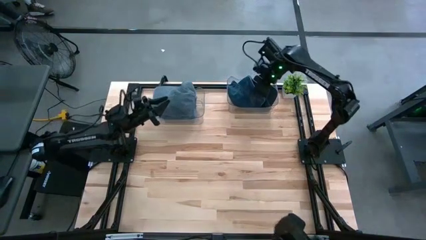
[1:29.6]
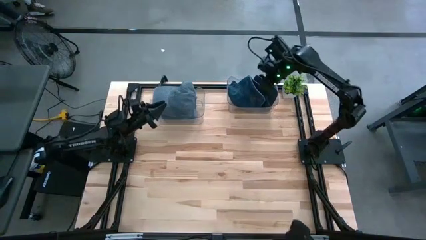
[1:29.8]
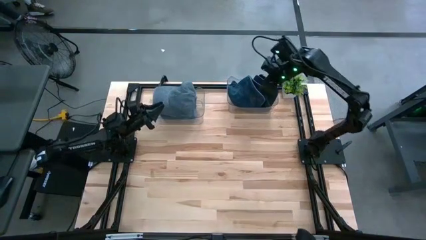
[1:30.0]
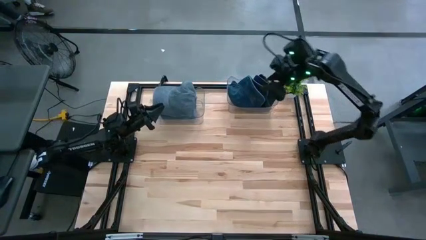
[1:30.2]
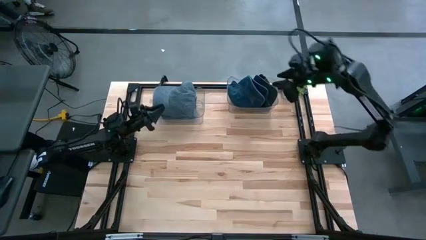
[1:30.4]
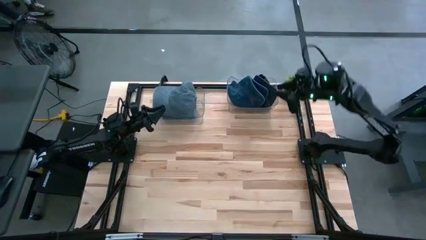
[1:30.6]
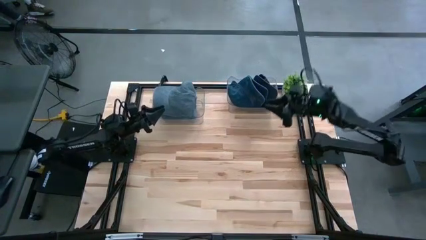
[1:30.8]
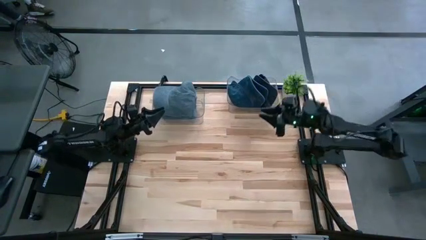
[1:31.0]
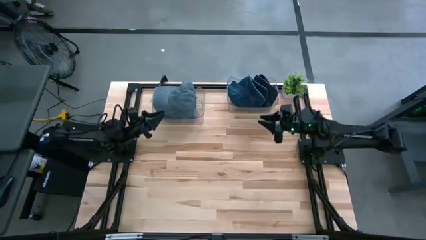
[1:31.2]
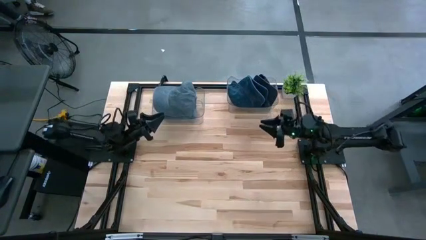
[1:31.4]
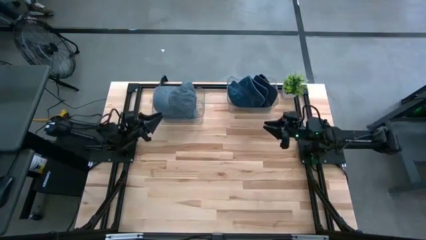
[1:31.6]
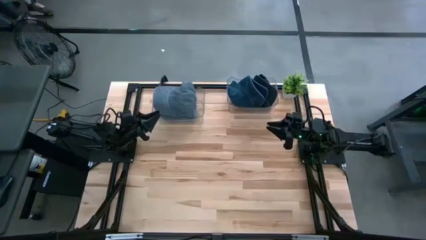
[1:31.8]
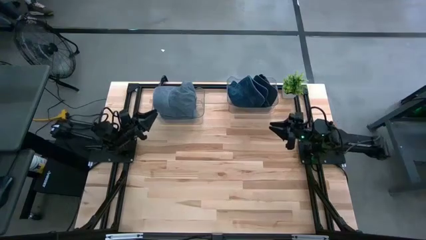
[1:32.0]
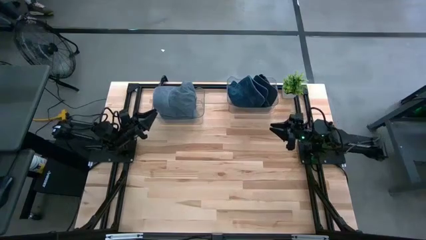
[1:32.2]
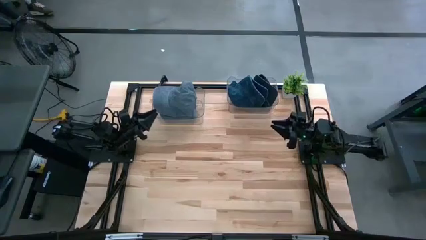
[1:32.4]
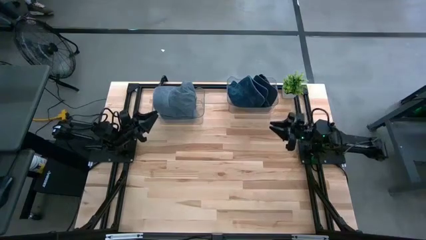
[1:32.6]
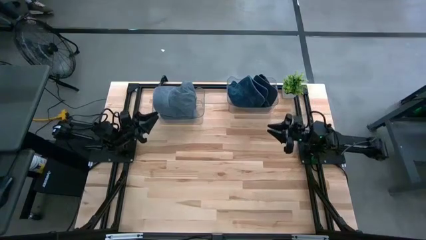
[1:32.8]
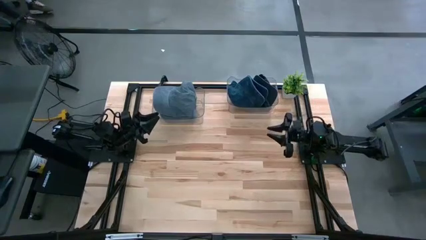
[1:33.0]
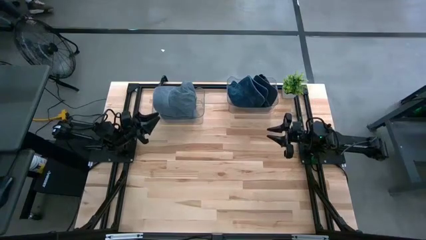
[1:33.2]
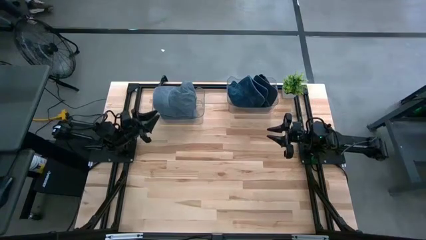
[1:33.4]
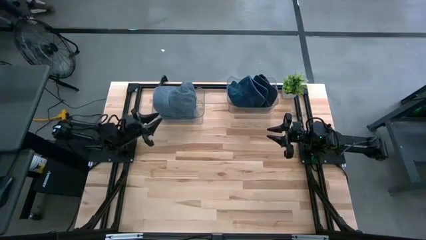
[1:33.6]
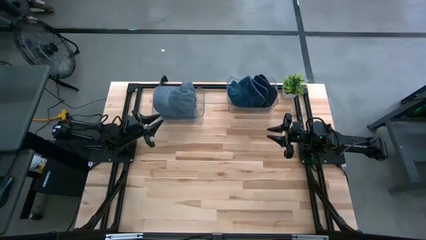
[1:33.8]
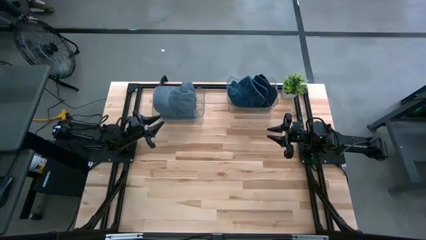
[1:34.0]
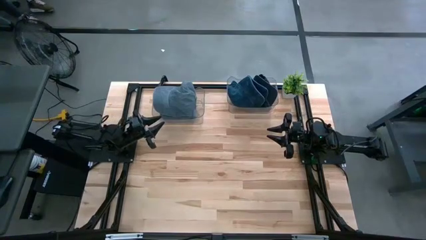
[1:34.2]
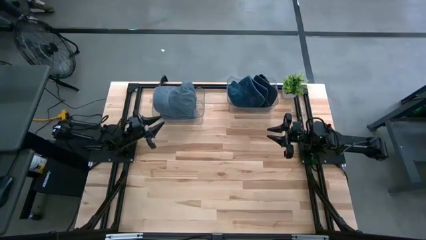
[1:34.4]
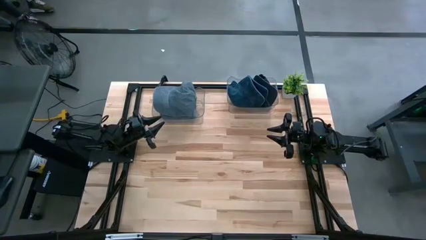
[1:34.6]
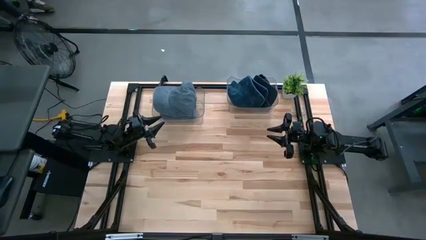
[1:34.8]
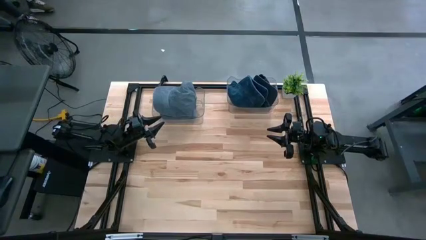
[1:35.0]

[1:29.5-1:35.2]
Task: Pick & Place hat
Return to Home Position

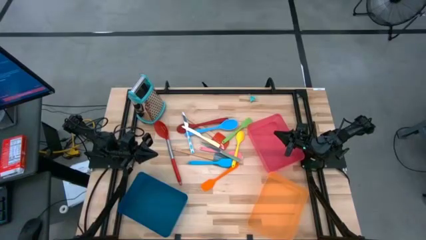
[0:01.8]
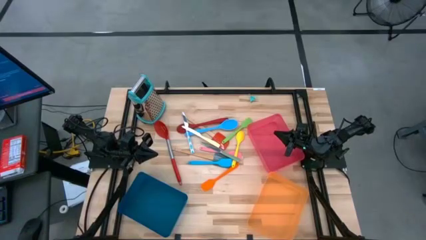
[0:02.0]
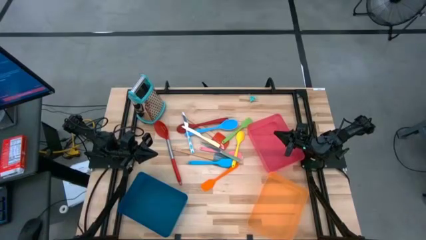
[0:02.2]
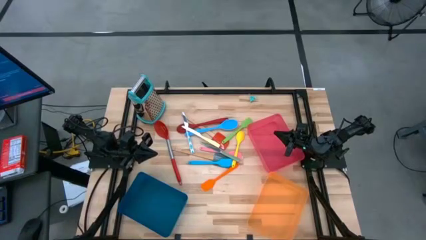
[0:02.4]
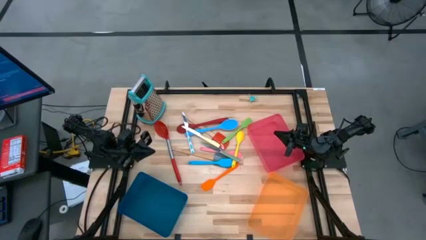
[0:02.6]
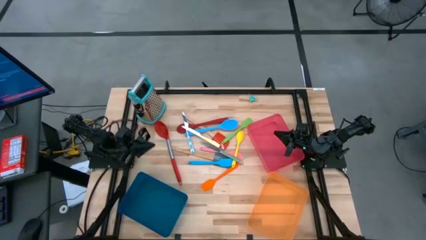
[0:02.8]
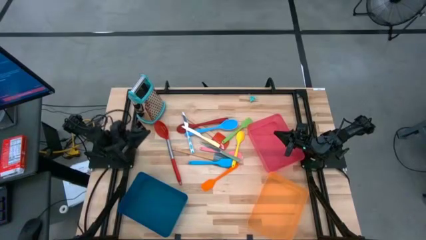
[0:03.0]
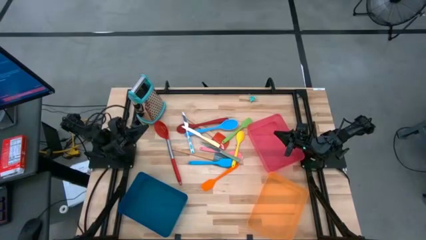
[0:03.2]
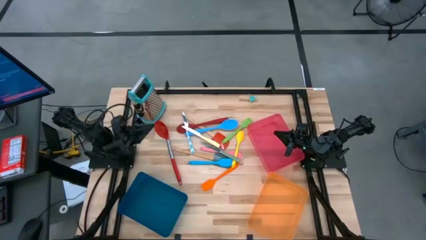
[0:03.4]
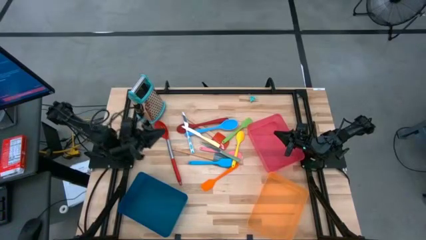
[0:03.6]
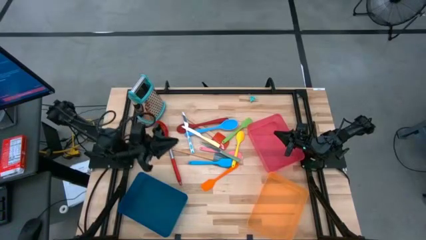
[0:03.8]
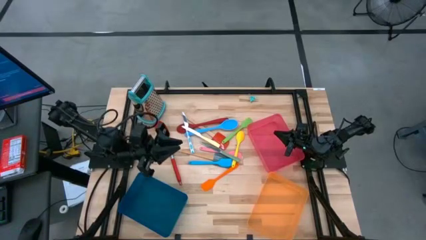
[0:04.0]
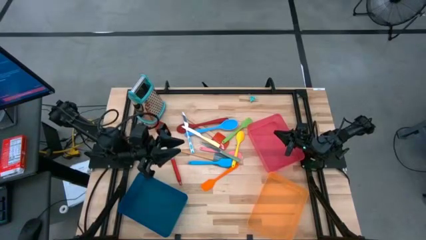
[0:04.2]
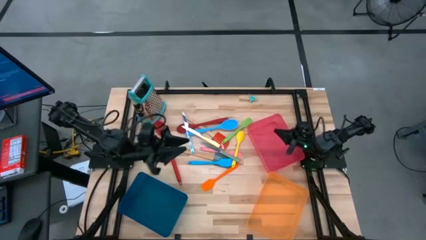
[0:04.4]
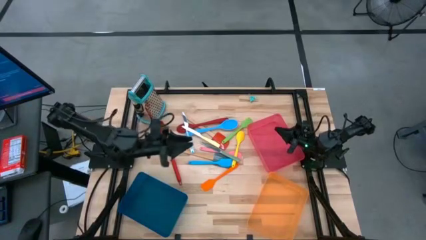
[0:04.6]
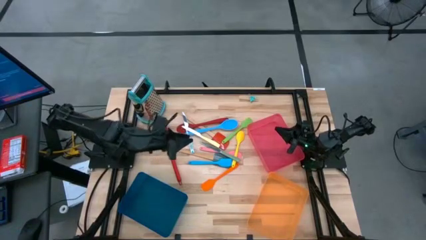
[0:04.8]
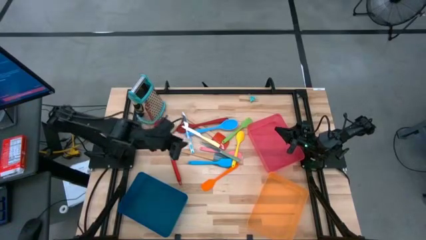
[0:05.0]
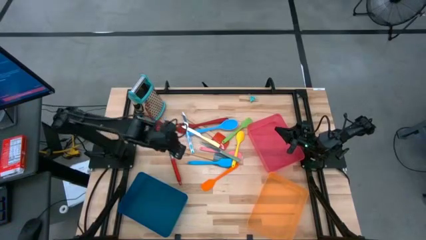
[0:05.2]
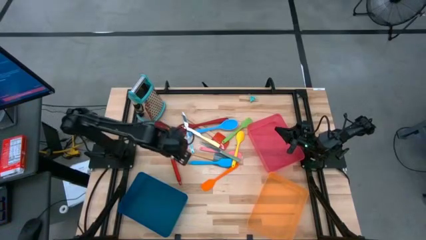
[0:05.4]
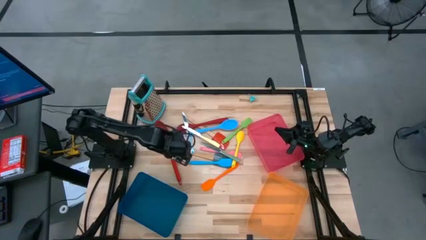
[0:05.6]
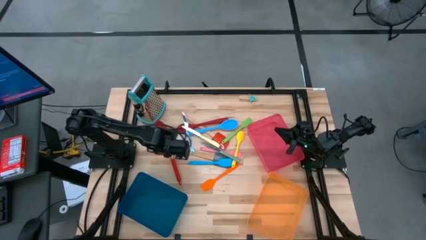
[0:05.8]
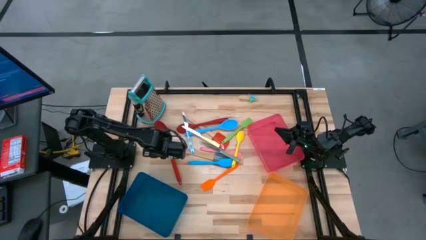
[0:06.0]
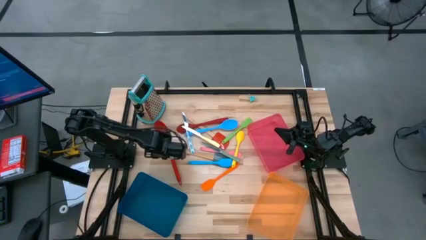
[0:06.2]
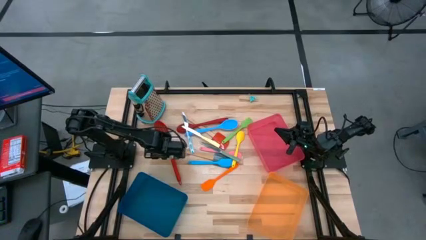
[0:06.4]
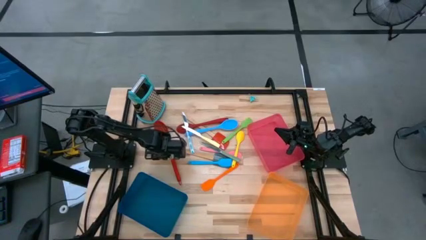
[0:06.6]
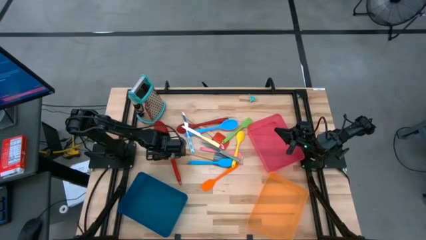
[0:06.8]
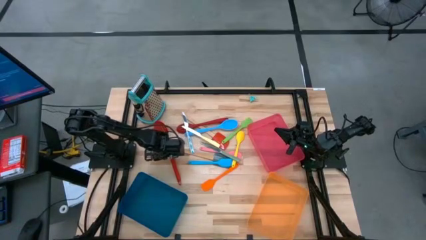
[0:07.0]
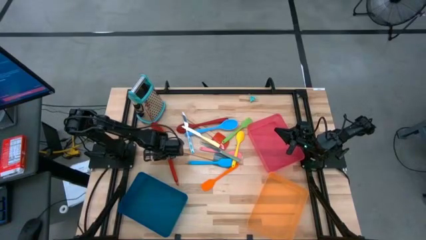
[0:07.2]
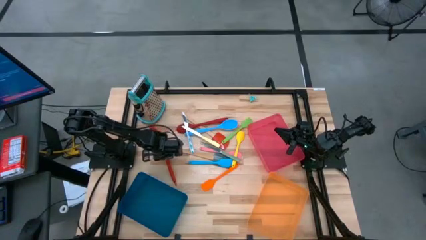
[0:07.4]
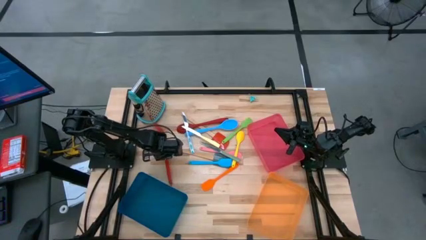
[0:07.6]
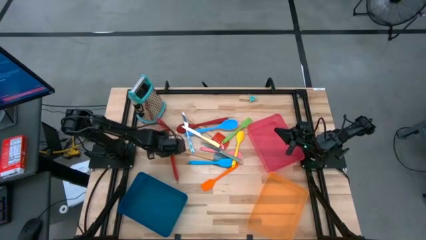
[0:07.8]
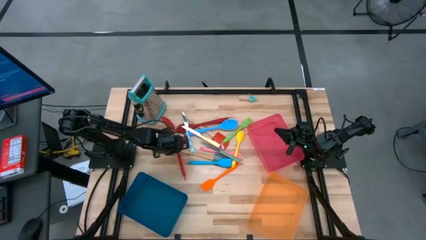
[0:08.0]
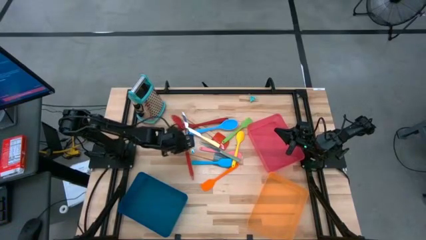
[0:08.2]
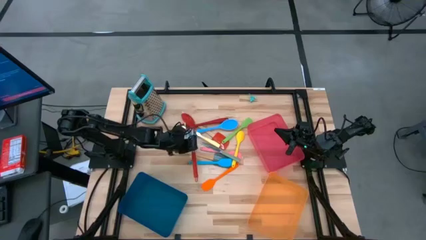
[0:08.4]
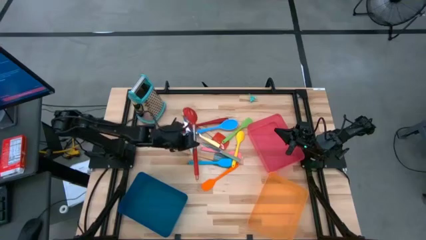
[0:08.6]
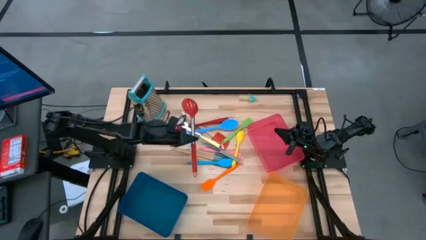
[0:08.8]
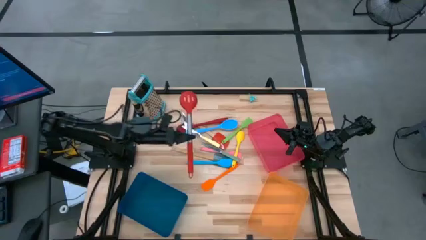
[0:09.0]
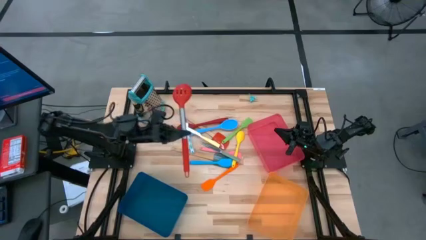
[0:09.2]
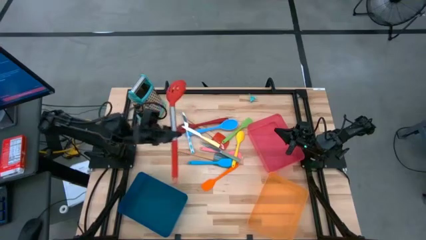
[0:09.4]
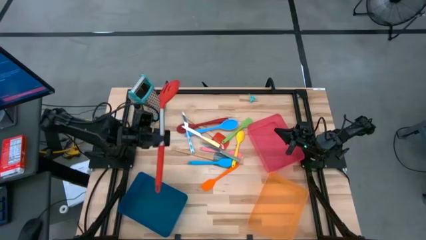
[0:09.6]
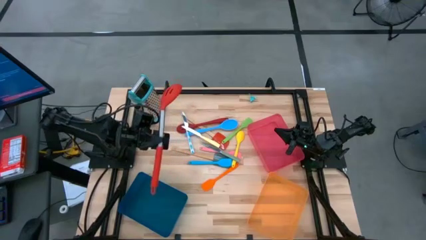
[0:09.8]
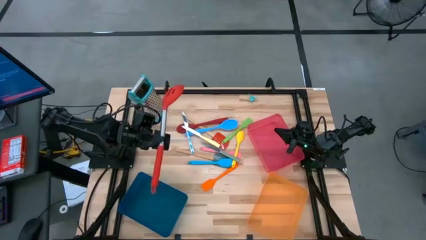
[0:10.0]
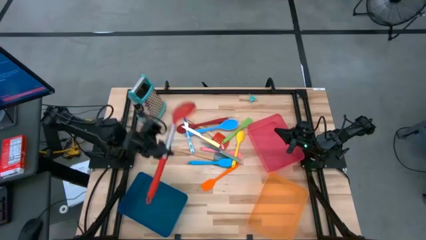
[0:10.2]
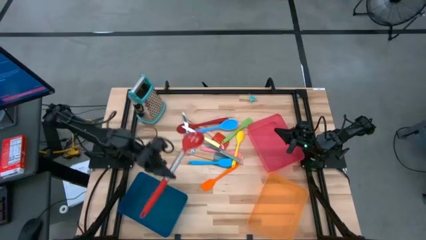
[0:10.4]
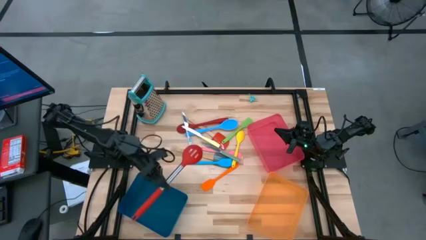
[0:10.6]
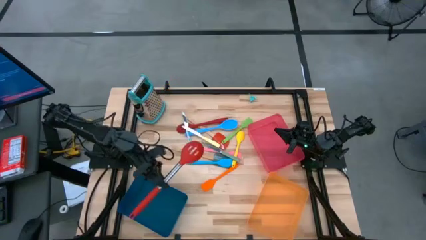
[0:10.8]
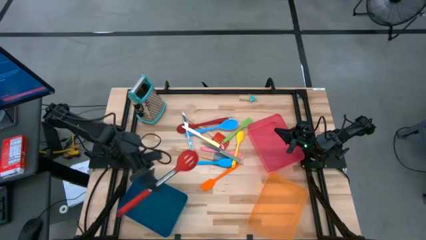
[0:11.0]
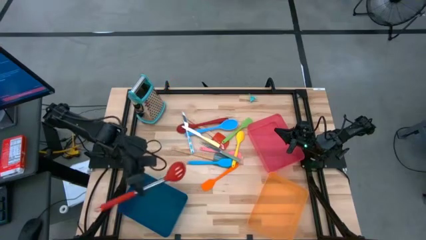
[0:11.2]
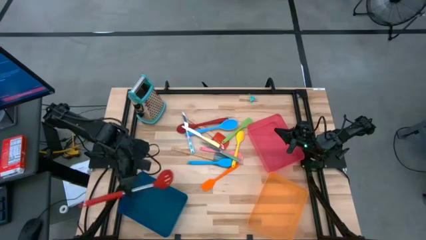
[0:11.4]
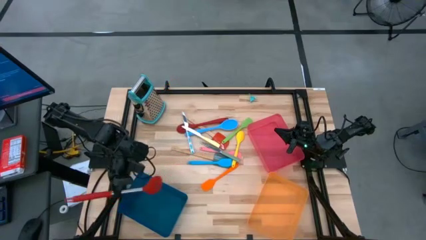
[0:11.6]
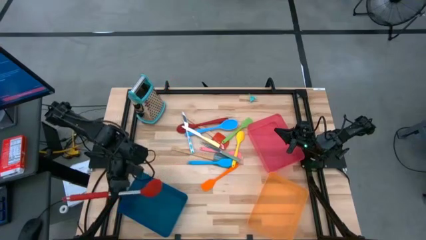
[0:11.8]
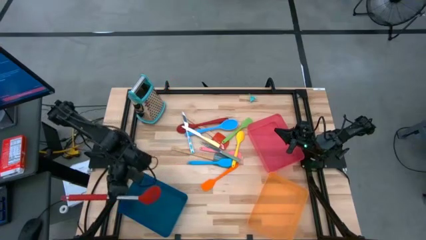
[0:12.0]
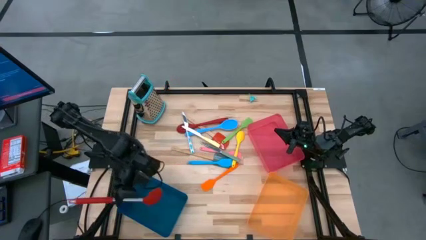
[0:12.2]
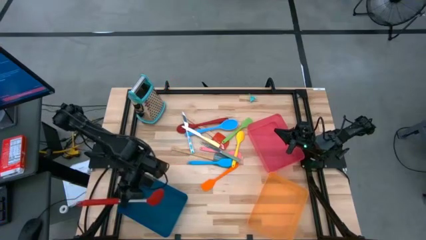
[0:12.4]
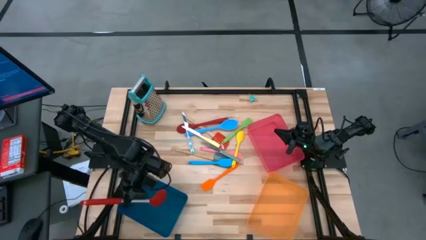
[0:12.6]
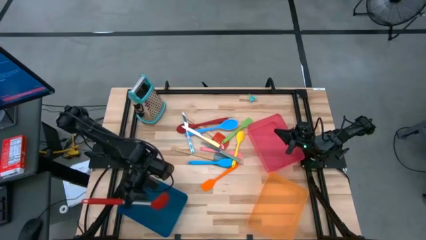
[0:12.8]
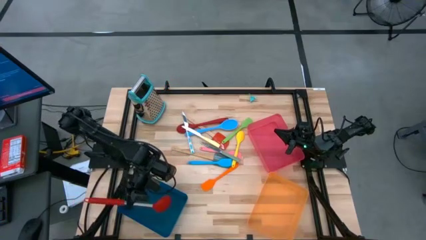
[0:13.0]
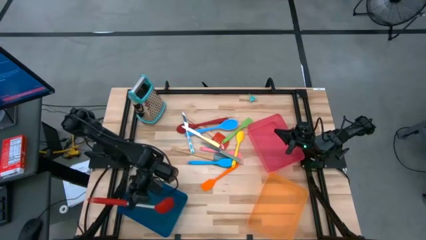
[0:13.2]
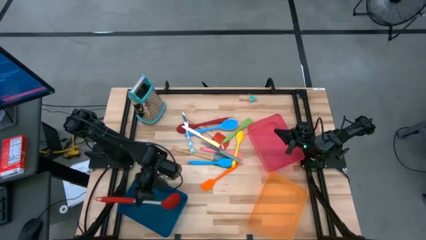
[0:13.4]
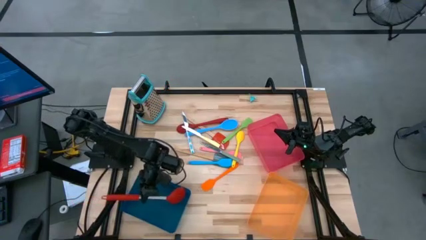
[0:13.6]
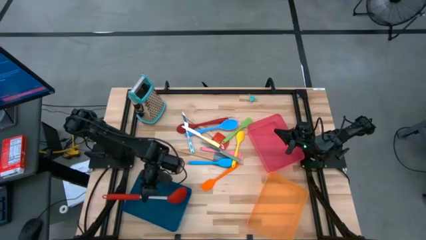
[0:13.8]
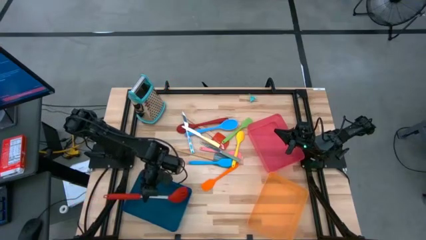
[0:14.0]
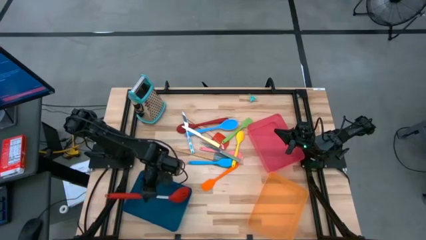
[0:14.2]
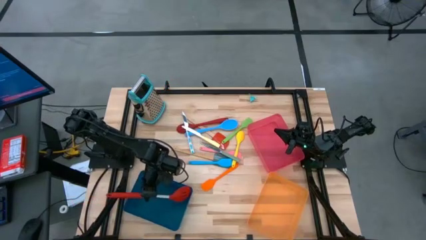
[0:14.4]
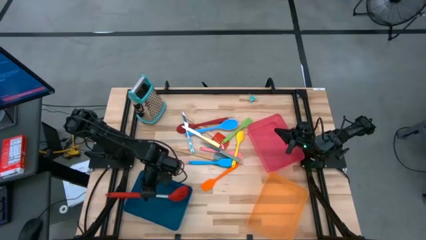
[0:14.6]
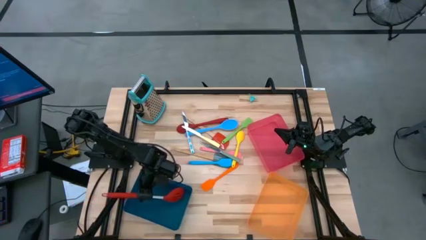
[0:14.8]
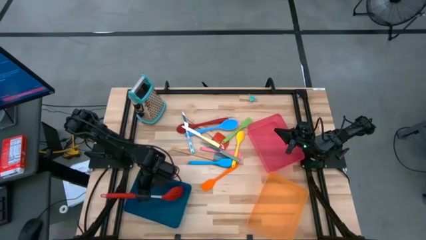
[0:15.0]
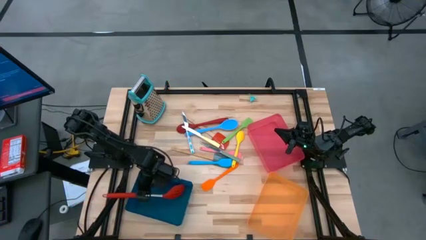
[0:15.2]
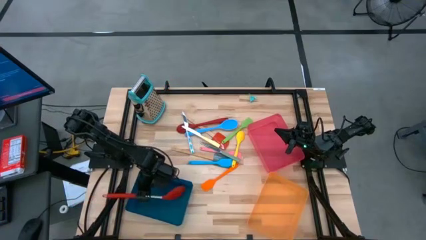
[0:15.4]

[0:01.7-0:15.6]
Task: Pick & Place Kitchen Items
Put the left red serving spoon into the blue bin
